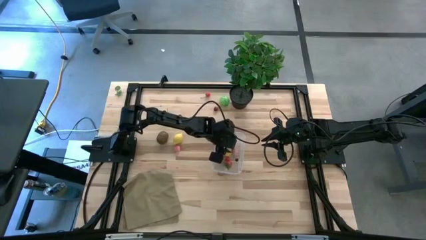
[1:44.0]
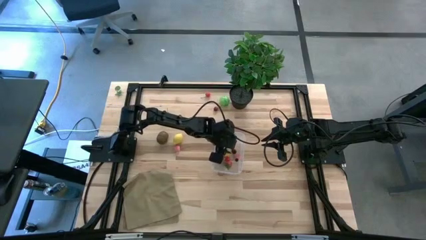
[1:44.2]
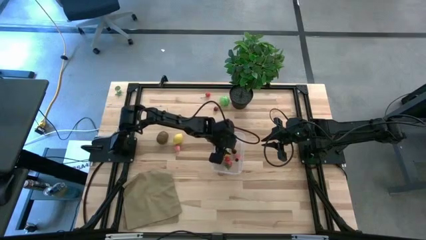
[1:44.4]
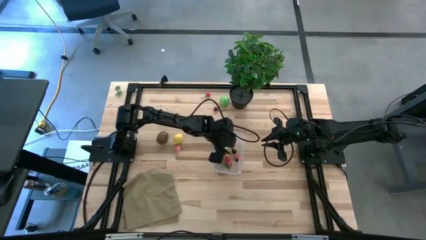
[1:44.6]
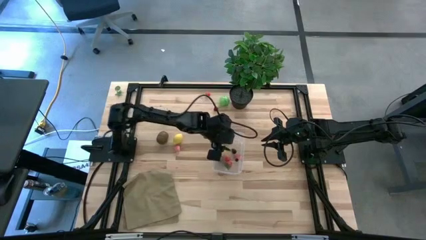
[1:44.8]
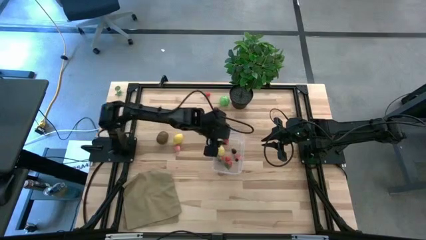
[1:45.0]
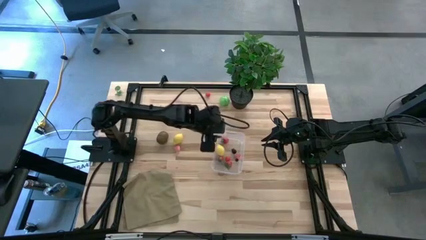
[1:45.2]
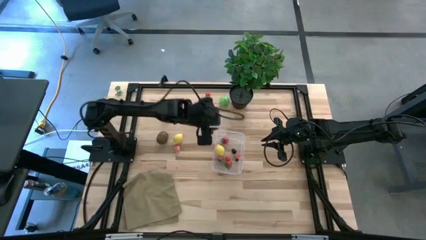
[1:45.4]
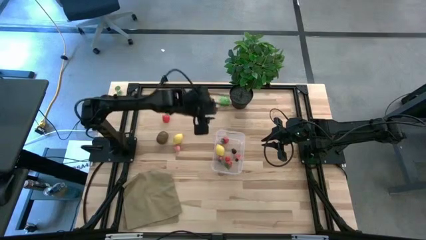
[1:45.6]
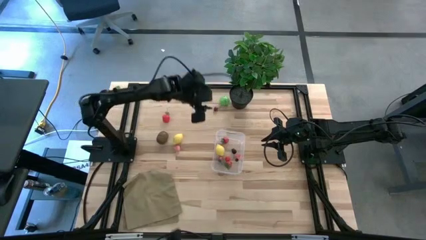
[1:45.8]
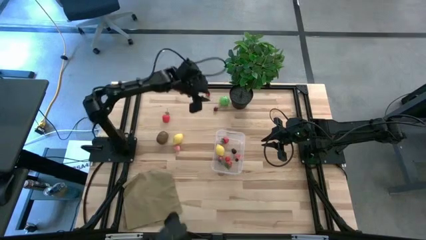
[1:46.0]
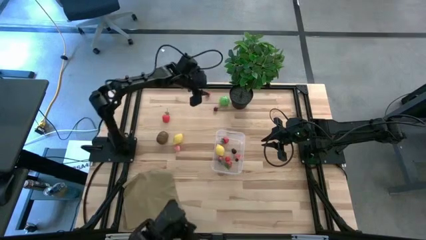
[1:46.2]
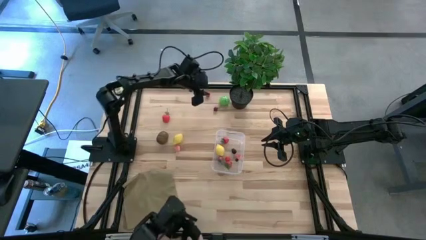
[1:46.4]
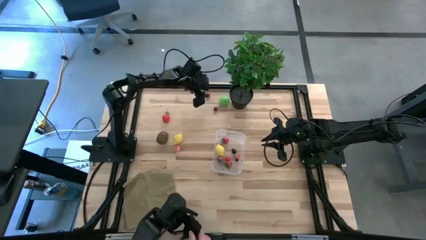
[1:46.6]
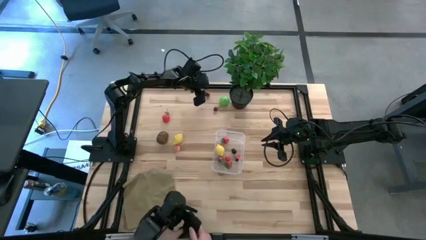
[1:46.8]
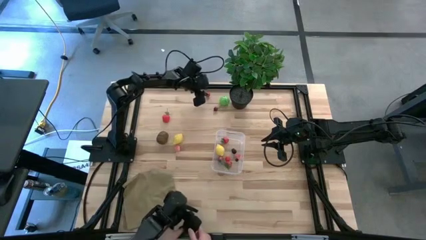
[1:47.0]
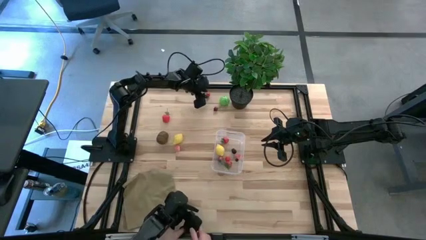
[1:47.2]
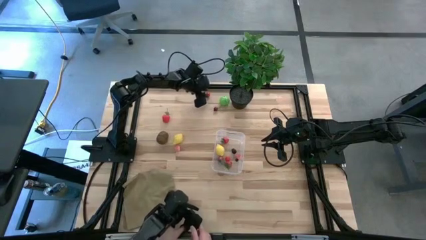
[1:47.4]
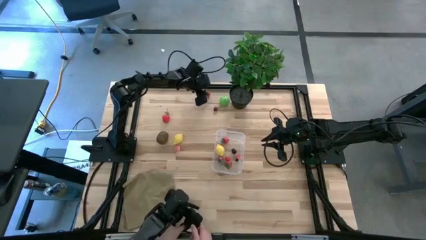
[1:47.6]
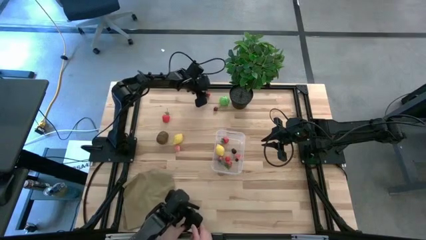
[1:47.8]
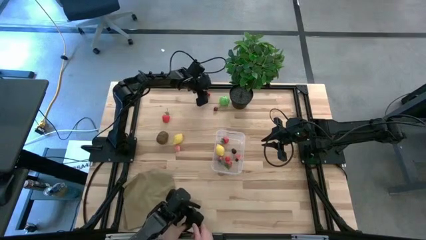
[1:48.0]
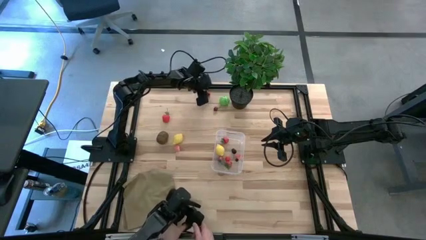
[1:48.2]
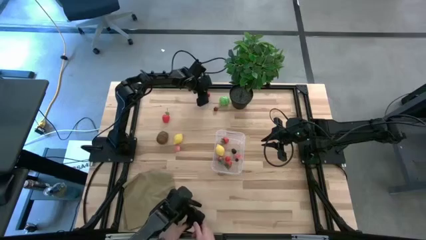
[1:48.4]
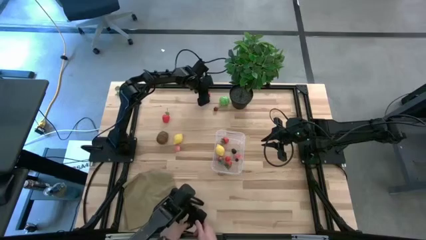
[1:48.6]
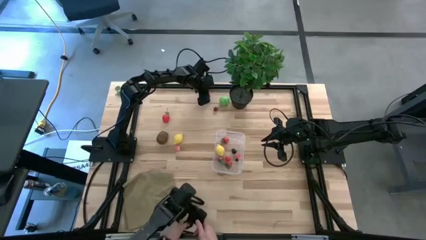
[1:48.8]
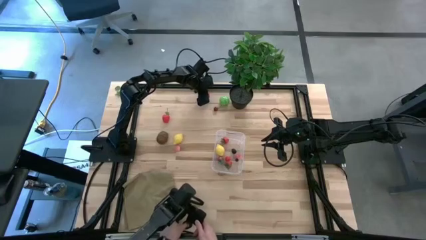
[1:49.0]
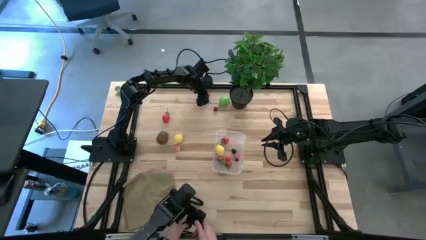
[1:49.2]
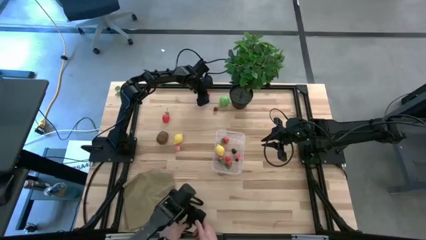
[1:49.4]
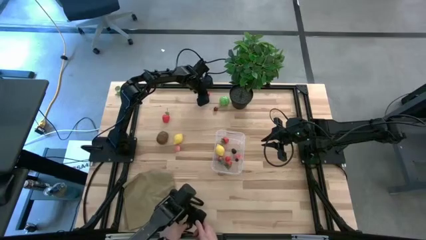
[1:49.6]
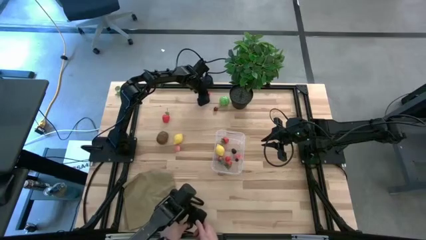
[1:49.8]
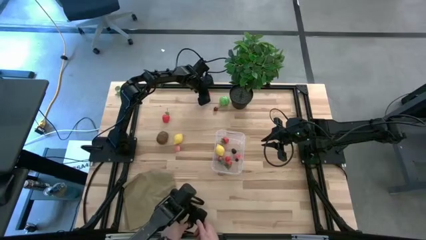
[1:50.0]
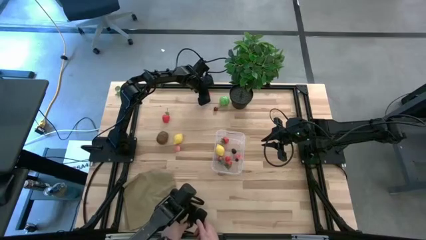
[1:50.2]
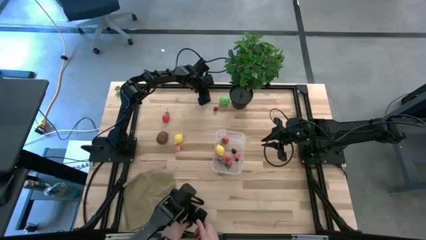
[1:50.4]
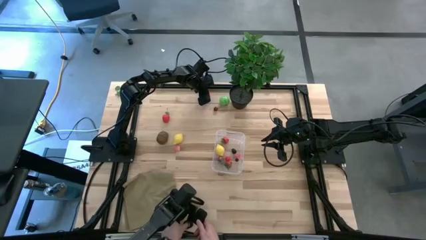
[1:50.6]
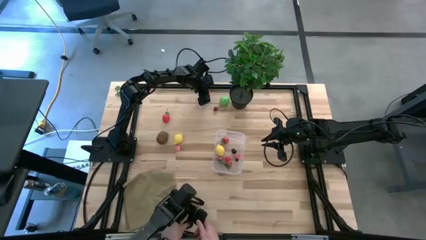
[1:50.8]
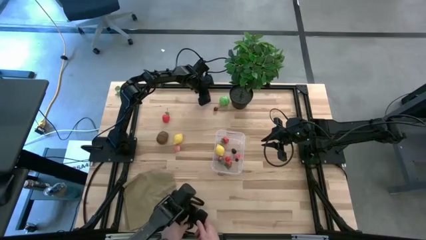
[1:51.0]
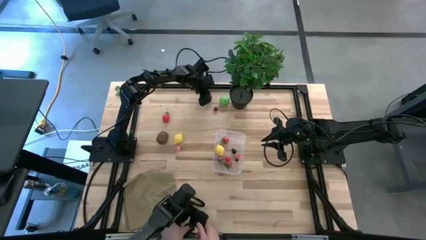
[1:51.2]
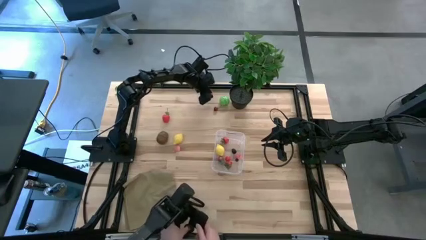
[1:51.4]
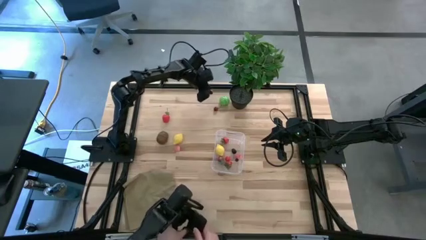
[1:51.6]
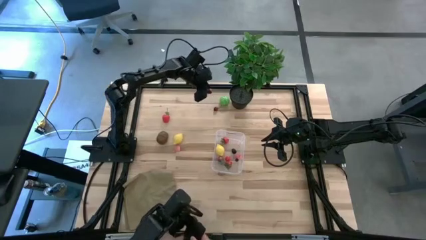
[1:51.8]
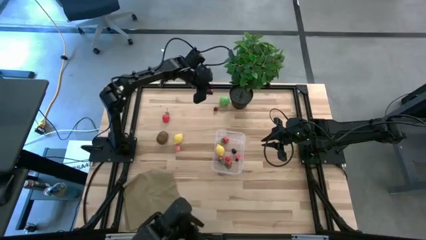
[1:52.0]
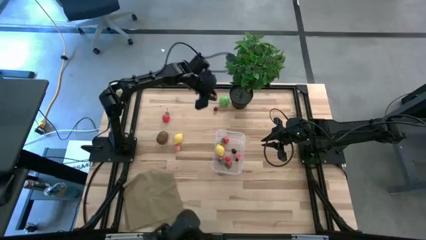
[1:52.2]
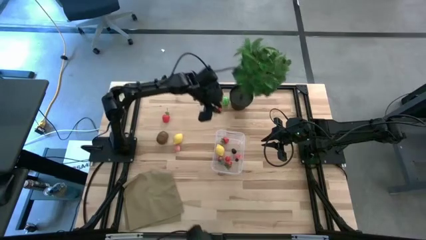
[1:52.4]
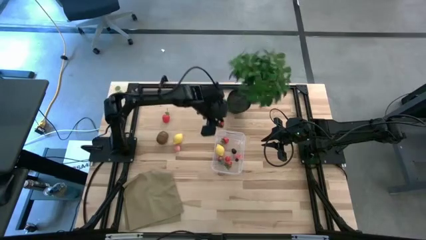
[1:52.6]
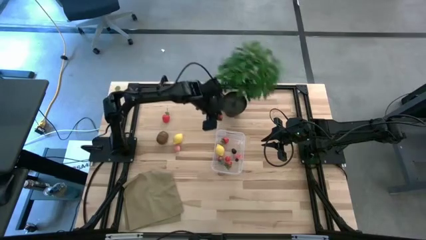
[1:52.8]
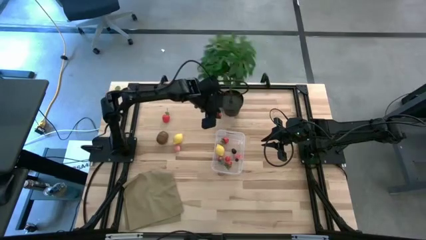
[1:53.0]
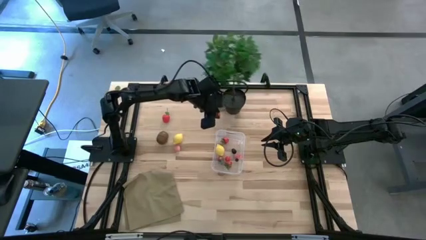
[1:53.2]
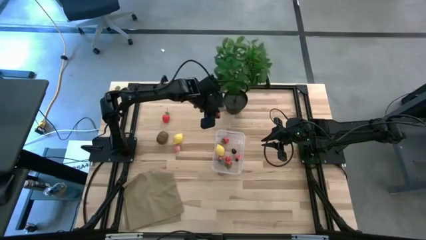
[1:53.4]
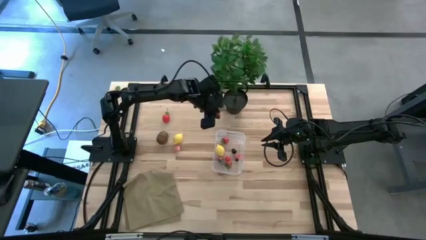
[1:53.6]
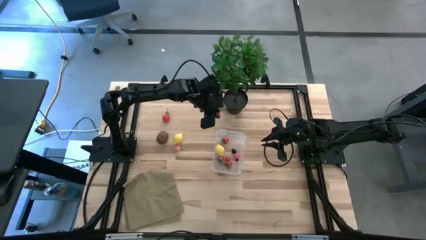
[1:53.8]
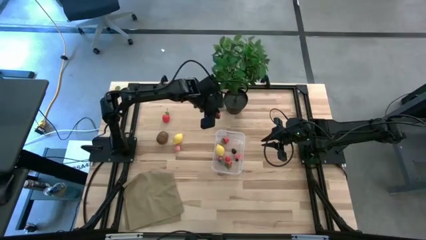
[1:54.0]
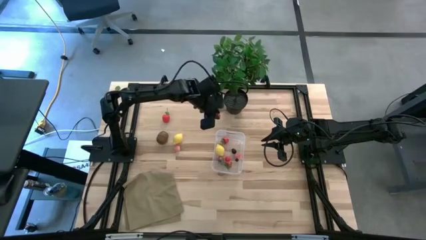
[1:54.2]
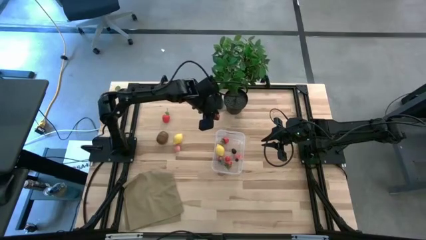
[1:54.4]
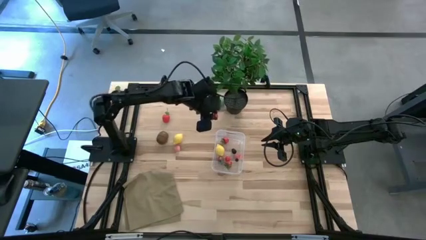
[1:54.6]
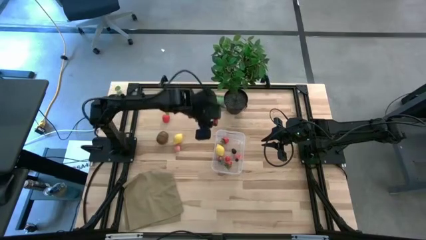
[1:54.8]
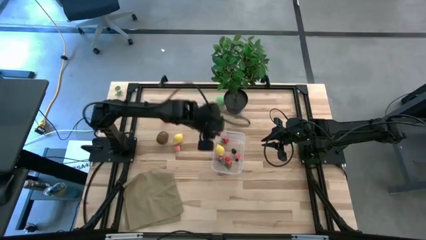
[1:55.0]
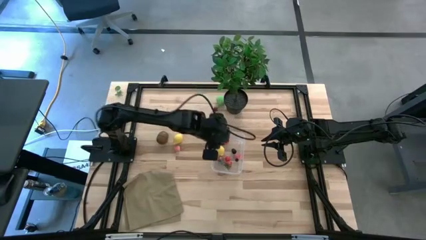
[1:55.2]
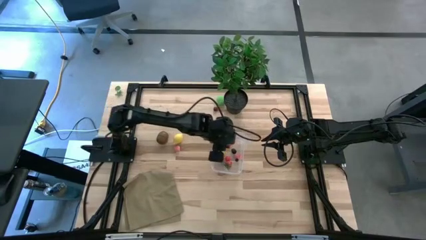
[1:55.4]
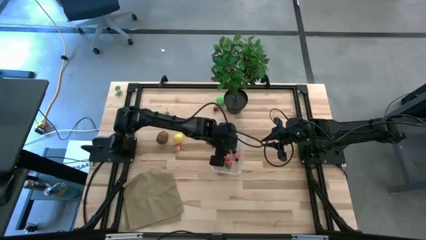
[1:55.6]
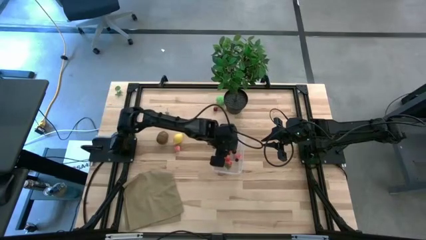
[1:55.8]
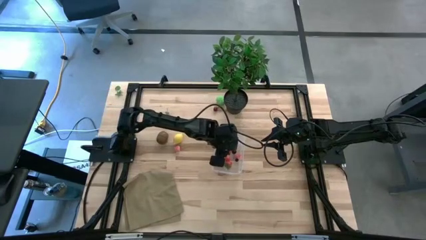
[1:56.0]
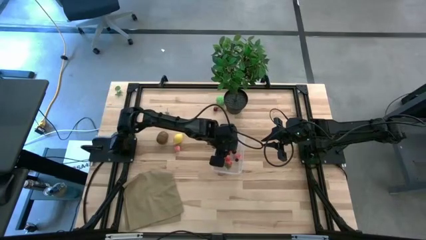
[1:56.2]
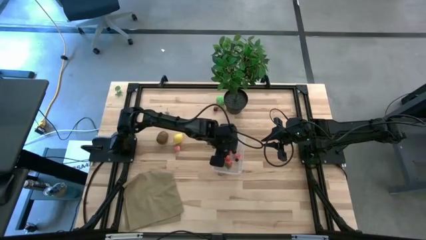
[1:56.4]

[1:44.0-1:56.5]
Task: Pick and placing Produce into tupperware
Put the red cherry into the transparent container

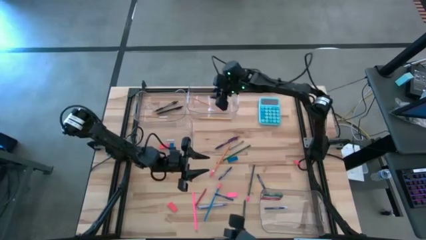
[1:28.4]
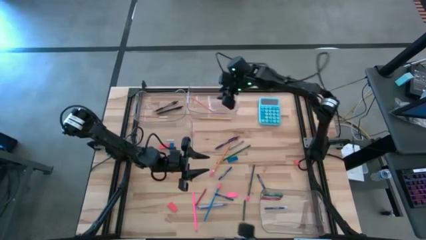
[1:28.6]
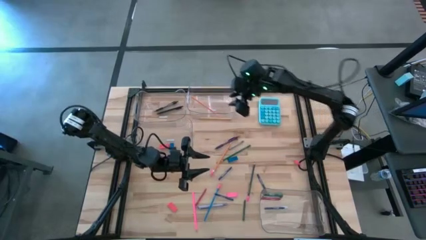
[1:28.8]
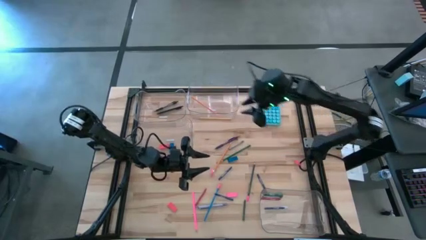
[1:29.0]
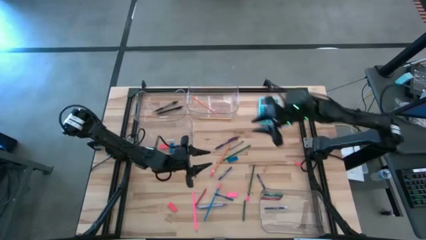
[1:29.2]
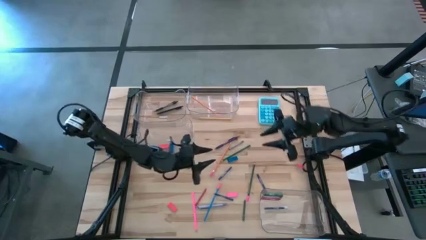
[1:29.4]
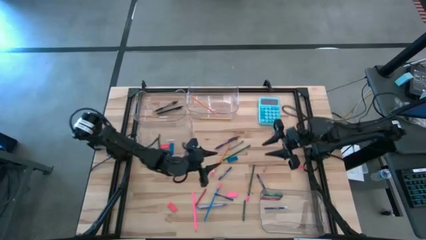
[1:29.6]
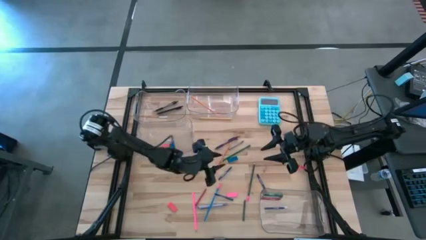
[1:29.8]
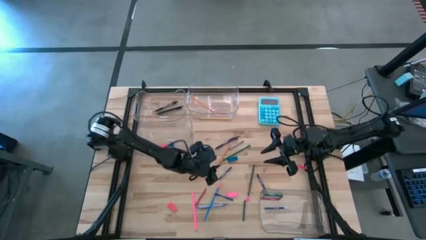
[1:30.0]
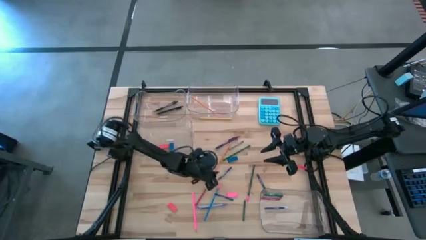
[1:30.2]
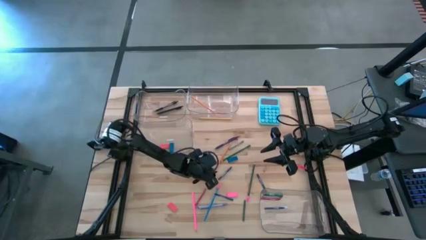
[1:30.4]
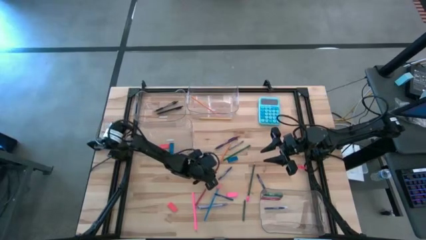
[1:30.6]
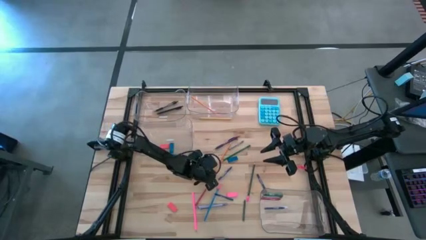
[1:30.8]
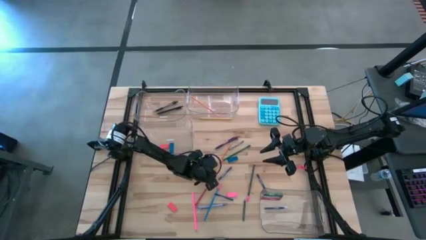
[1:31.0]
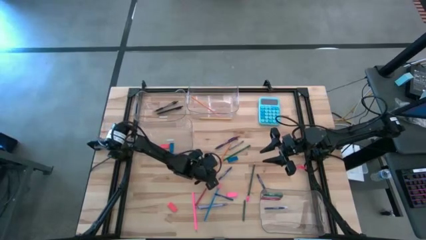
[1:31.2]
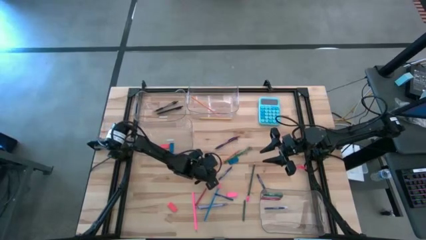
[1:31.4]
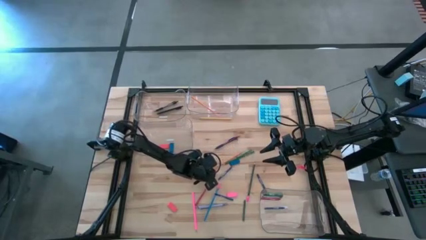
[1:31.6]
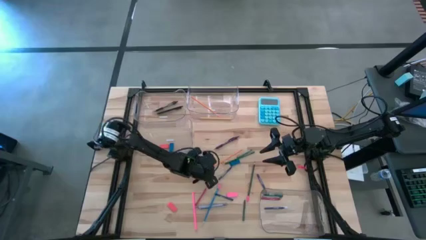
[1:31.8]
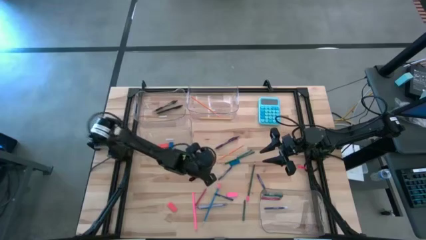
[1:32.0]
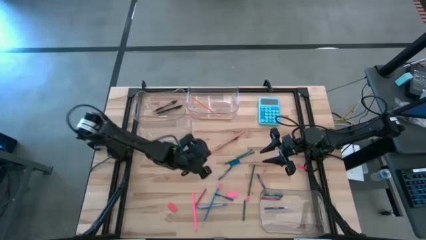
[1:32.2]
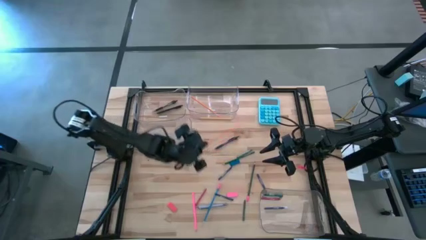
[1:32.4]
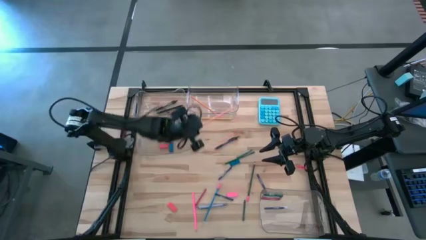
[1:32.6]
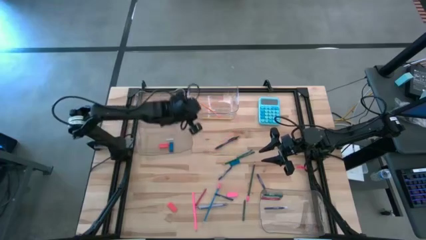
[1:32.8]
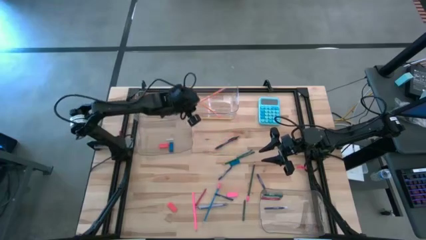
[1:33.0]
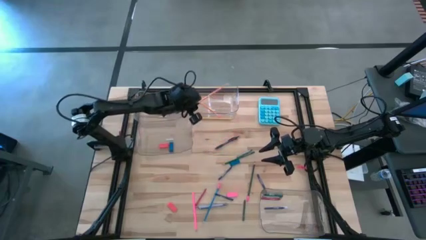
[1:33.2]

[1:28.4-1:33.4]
Task: Sort crayons/erasers/pens/pencils in bins
Put the orange pencil into the top right transparent bin
